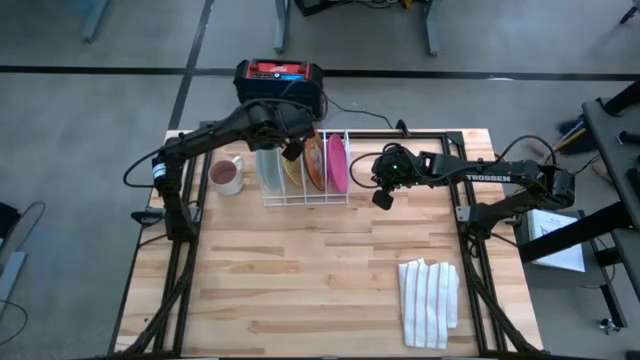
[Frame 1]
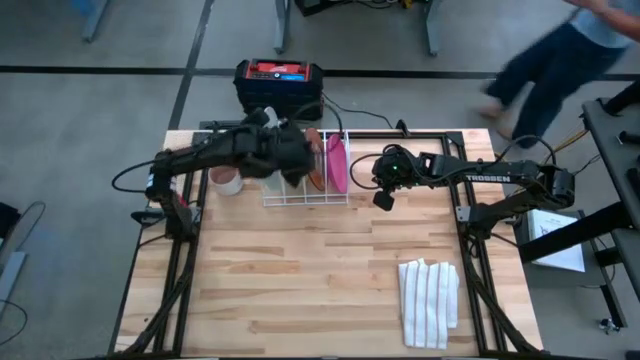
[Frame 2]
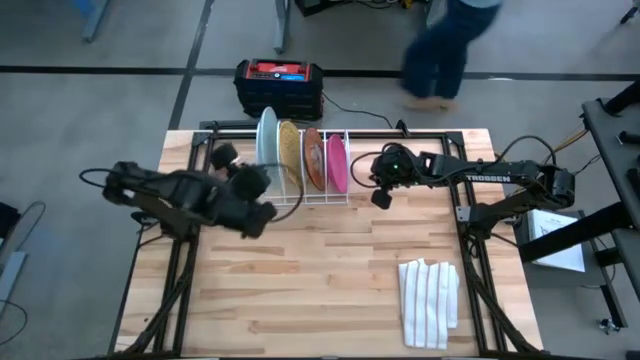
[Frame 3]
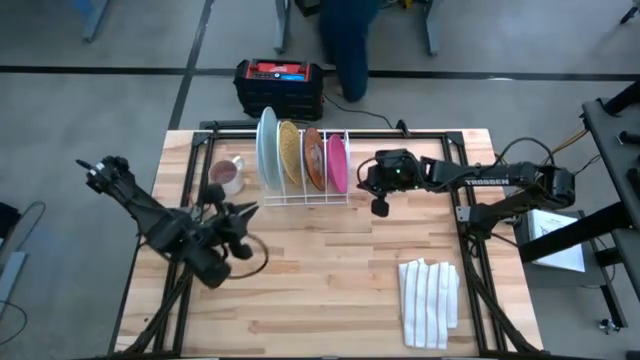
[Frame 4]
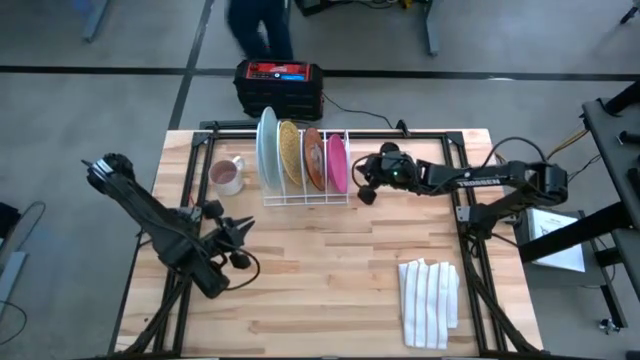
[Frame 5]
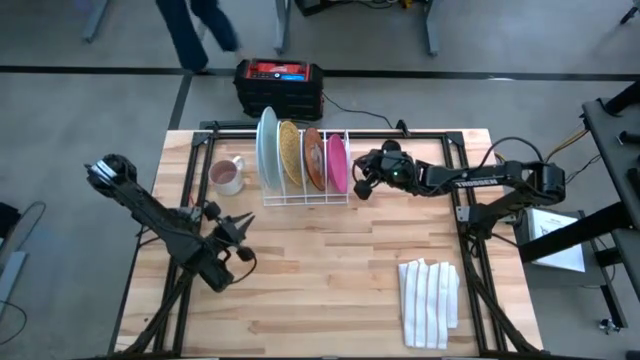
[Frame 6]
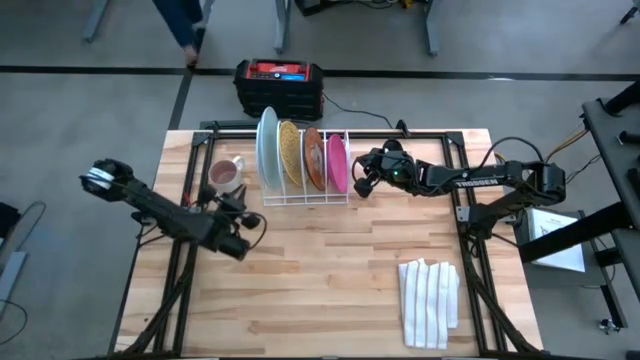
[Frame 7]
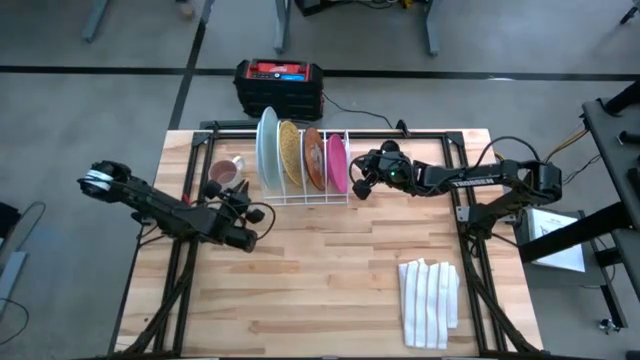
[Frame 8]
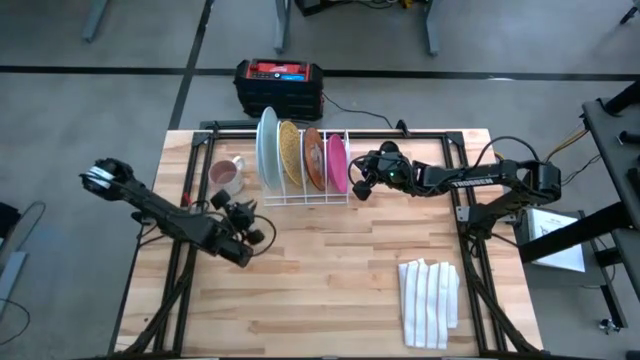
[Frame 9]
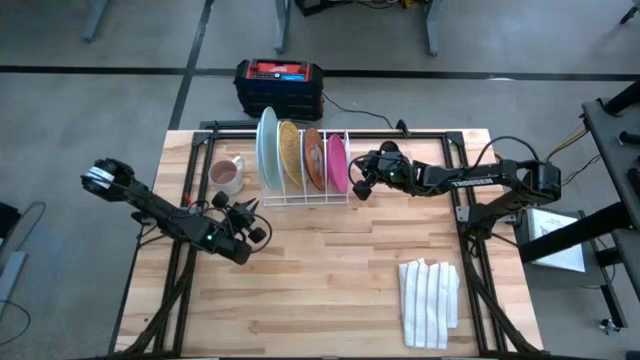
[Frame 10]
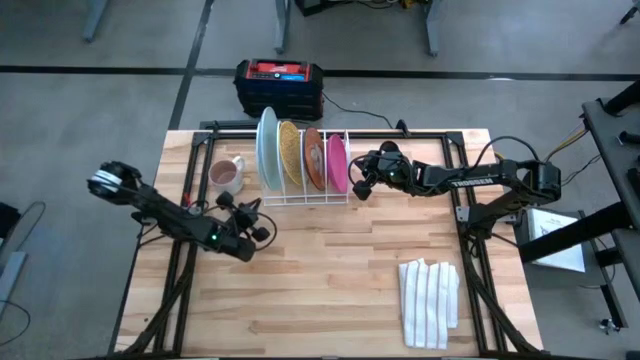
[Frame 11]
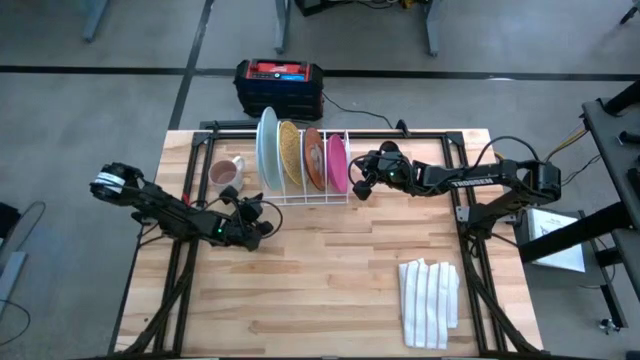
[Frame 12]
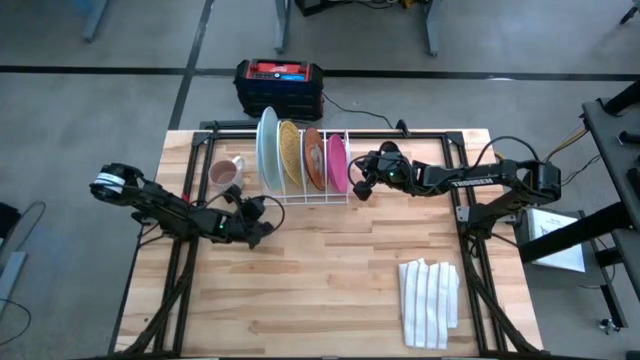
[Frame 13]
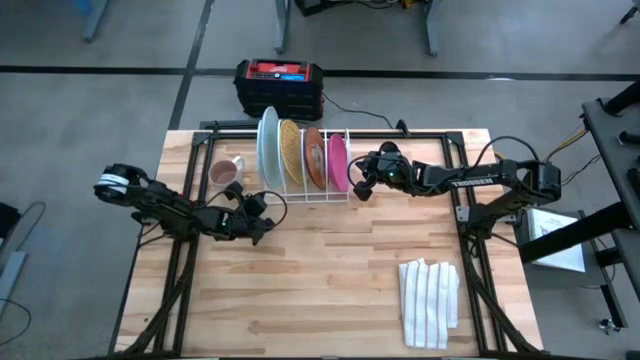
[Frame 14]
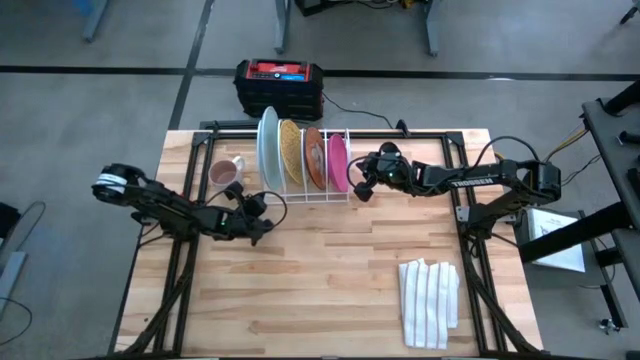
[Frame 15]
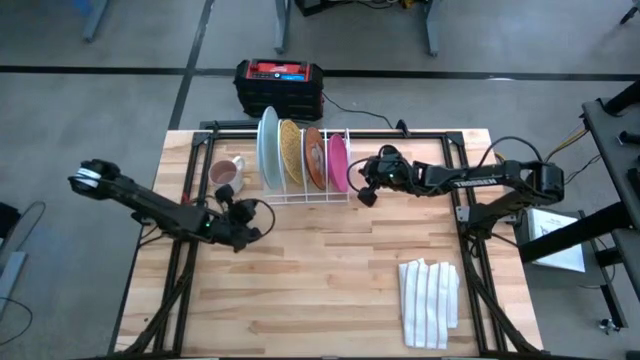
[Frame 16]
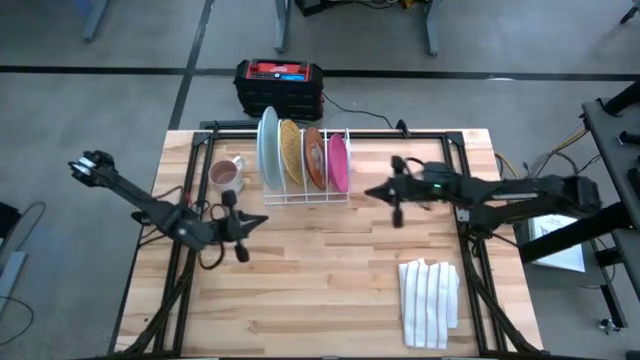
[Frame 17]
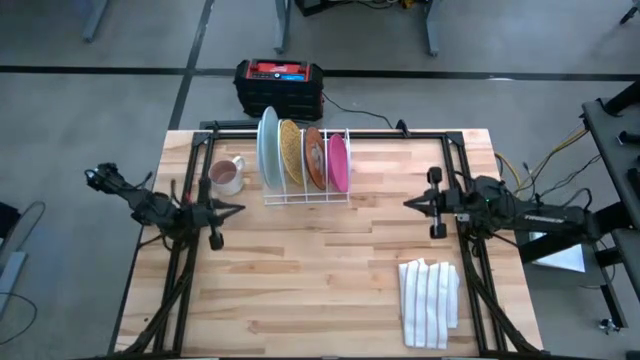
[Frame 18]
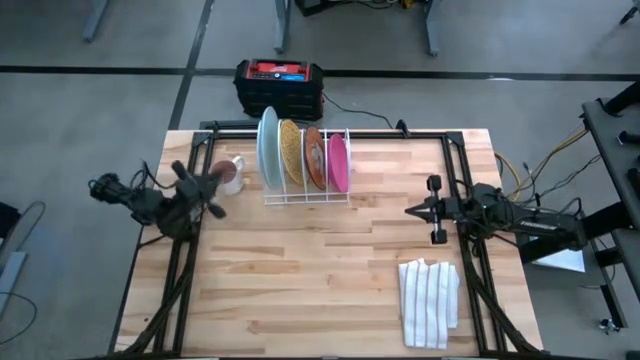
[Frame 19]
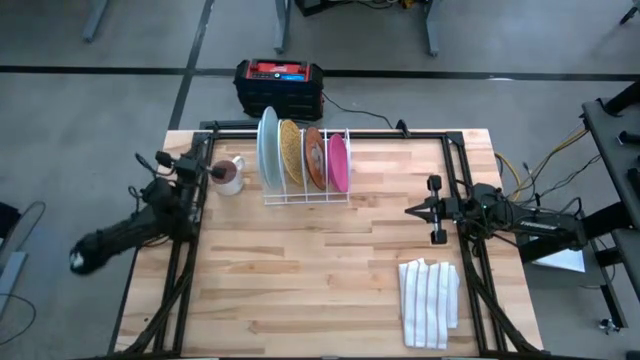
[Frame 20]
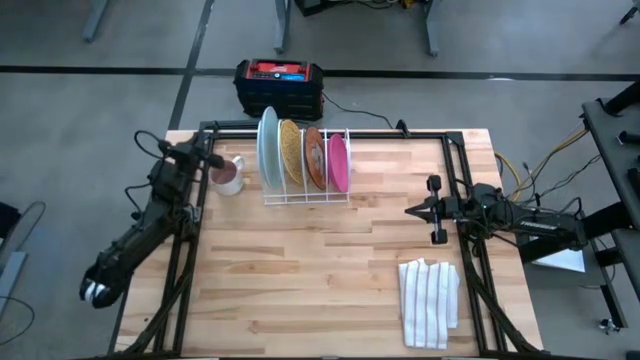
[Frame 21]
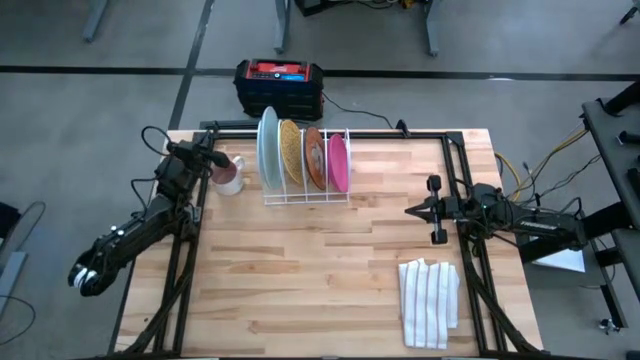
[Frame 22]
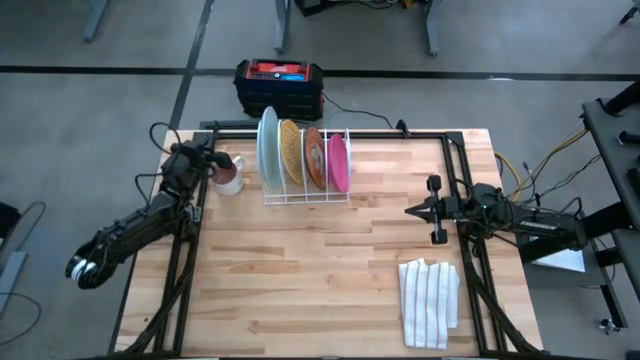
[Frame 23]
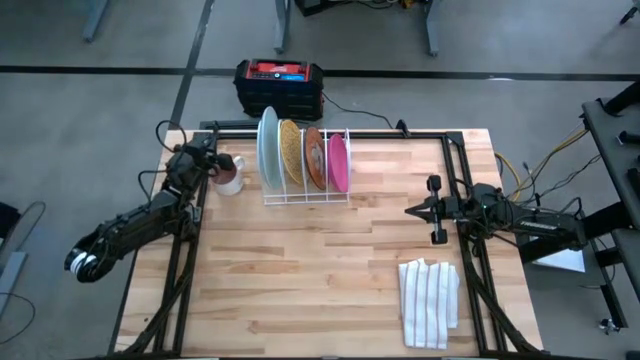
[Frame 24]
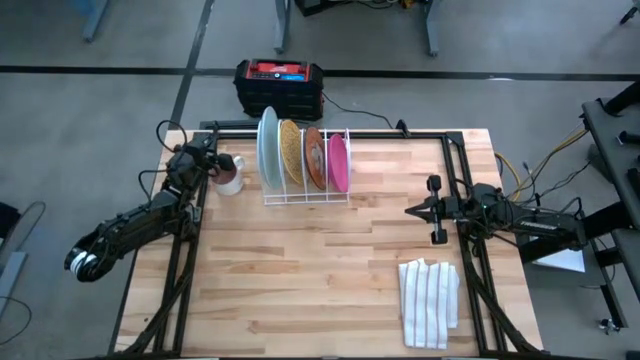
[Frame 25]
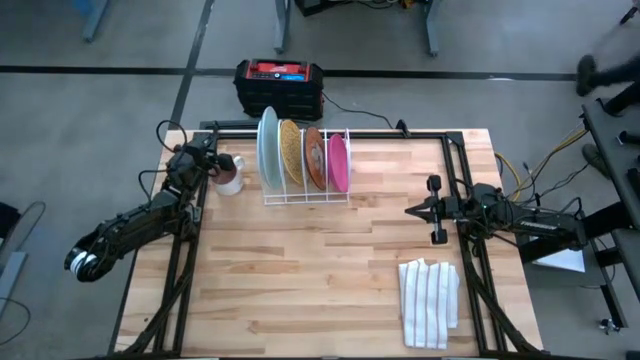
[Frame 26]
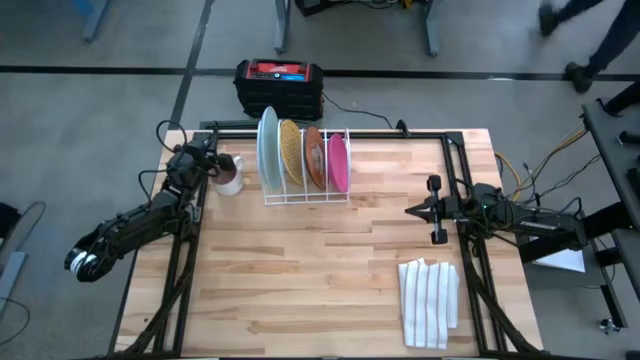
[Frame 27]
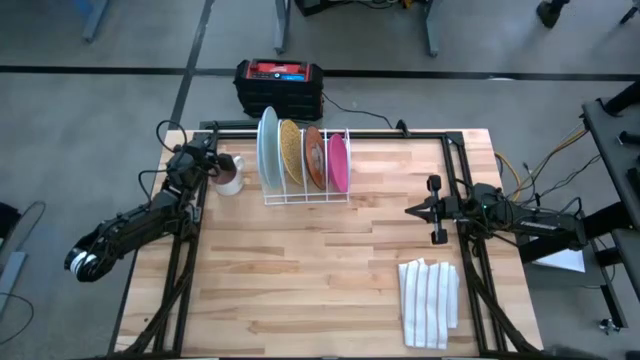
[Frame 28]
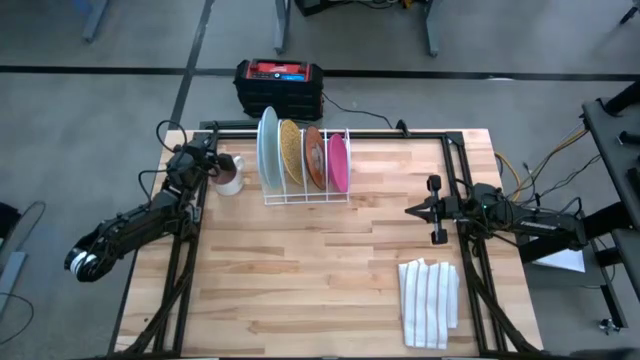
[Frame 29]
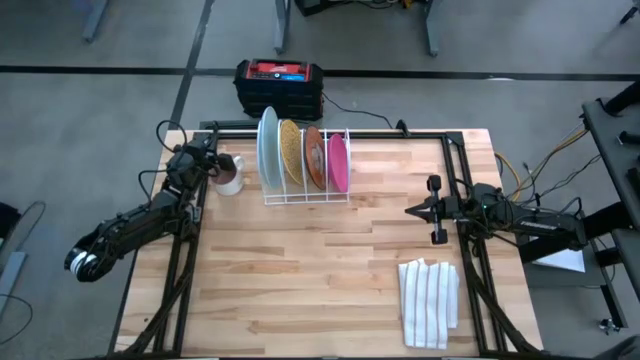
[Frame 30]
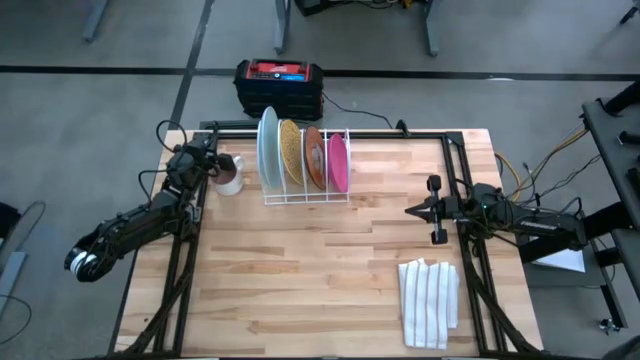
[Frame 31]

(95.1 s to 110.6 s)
Task: Sort dishes
Return to Home Position

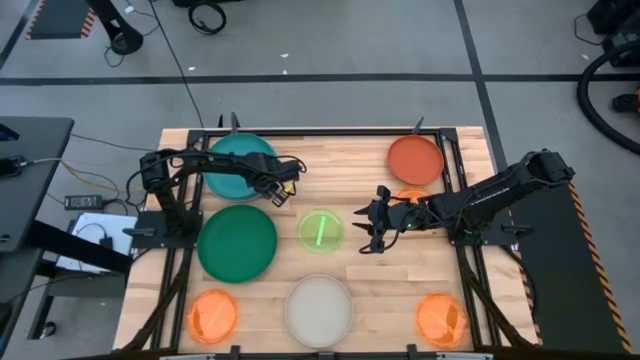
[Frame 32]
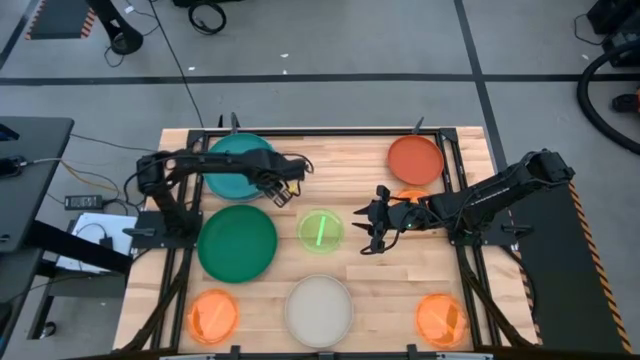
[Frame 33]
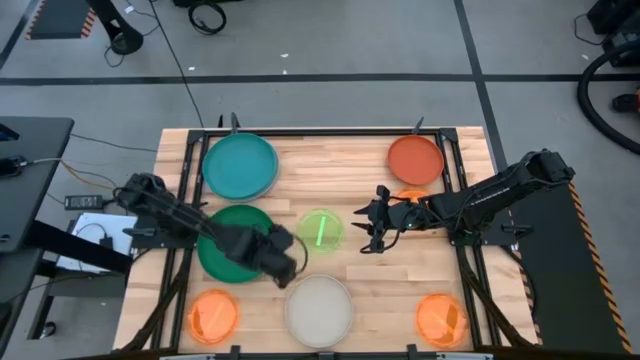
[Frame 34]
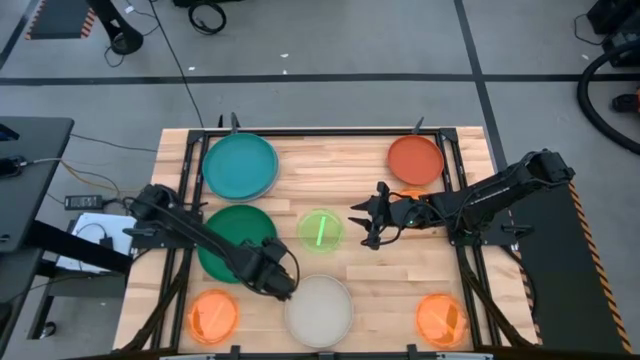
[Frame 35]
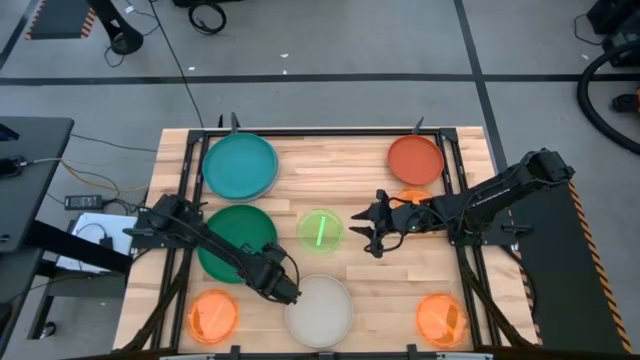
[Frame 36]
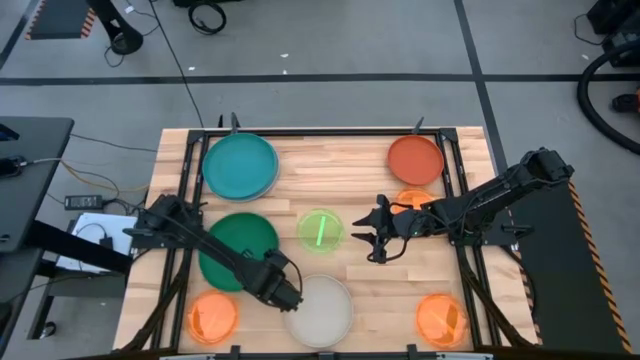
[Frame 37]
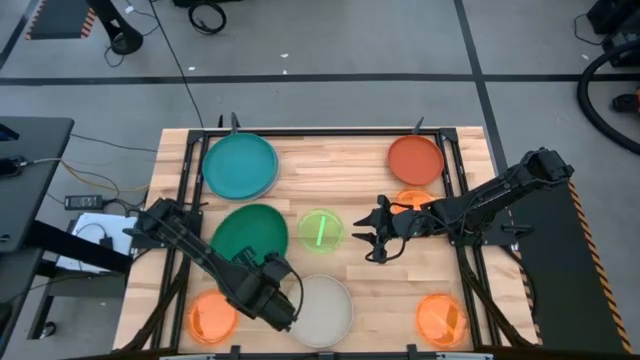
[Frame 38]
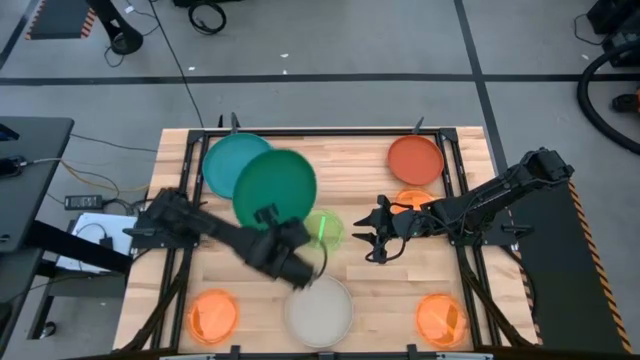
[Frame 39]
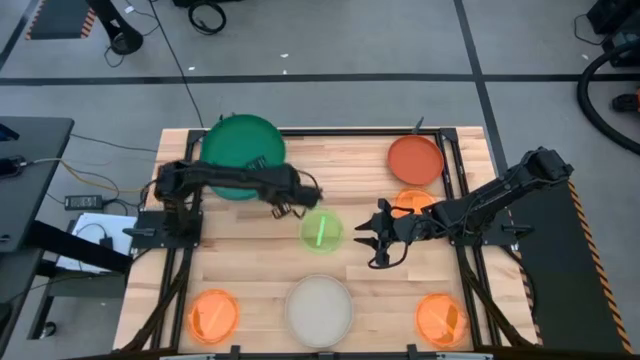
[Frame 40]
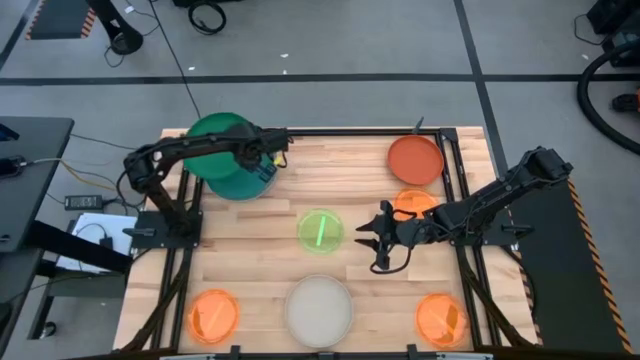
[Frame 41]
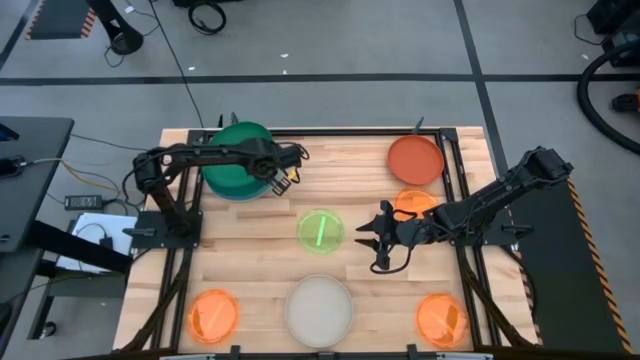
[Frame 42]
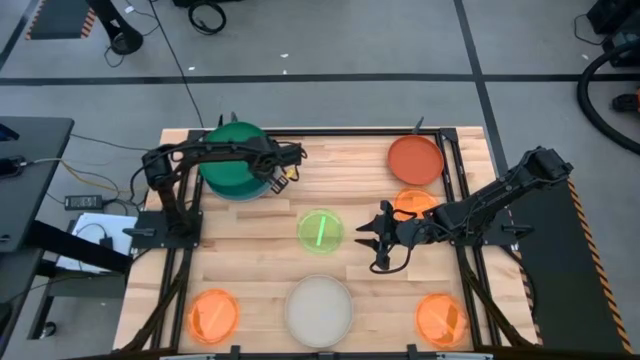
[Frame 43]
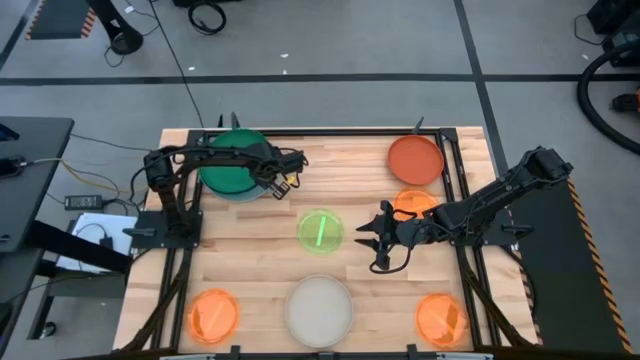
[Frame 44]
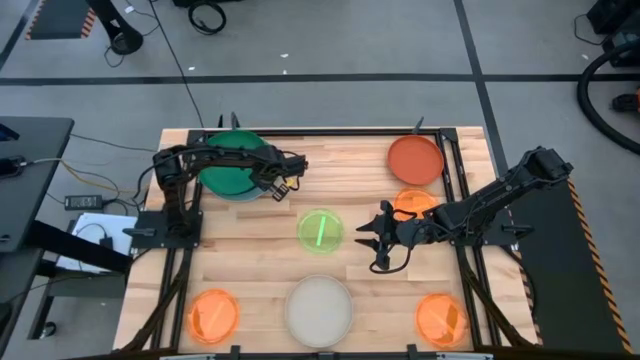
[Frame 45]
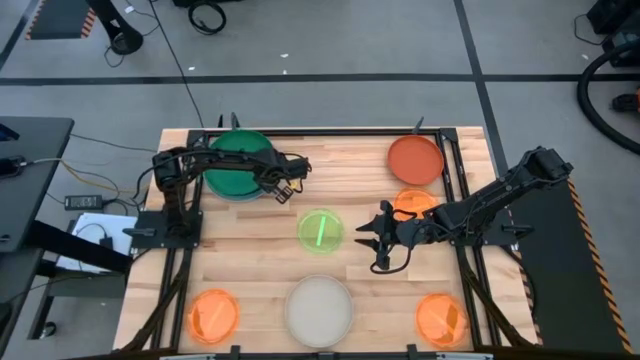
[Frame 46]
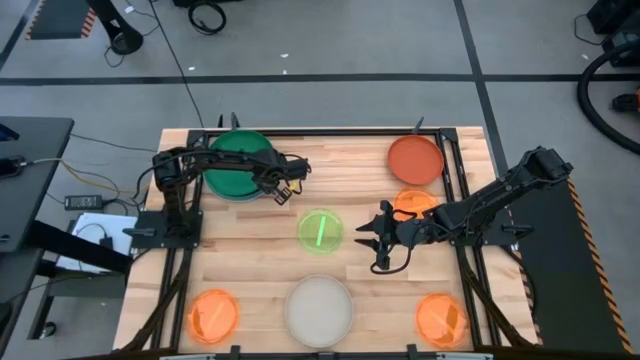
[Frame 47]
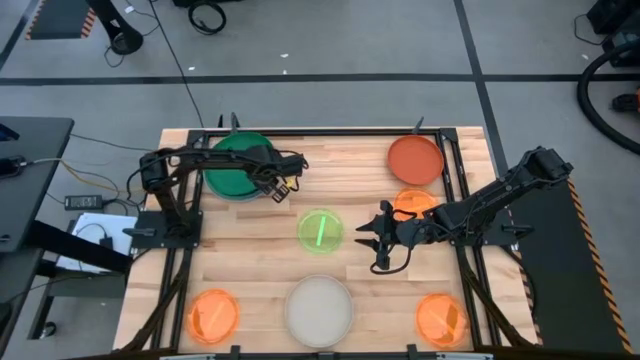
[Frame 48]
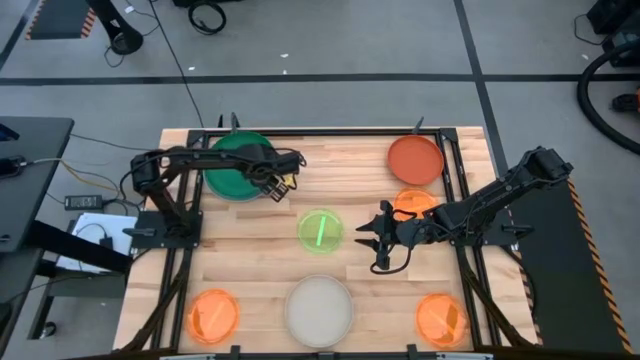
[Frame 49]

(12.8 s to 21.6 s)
Task: Stack plastic plates
Stack the green plate on top of the blue plate
